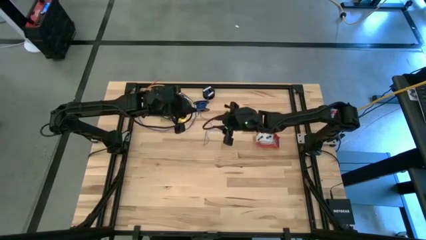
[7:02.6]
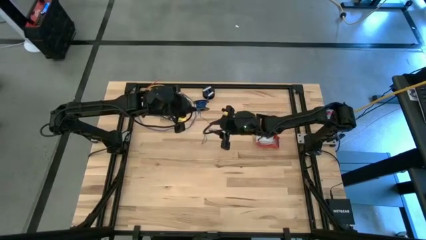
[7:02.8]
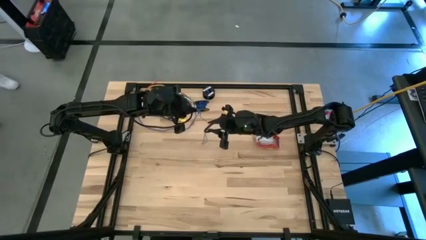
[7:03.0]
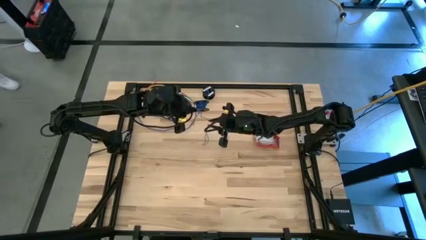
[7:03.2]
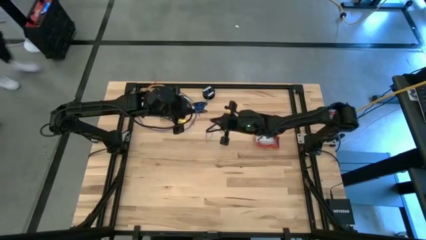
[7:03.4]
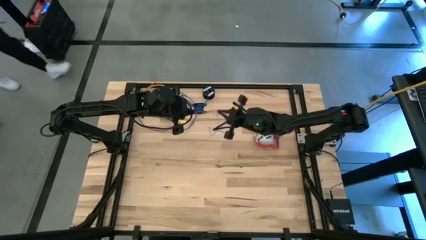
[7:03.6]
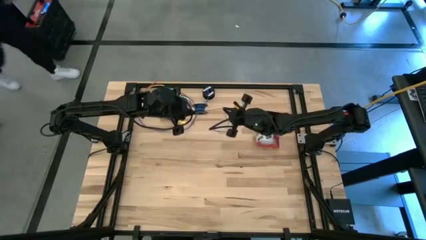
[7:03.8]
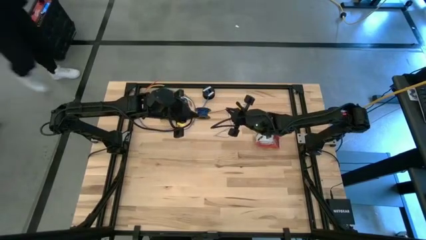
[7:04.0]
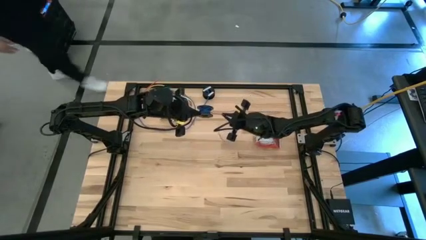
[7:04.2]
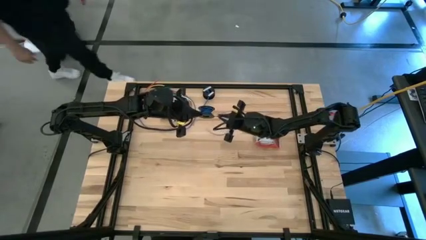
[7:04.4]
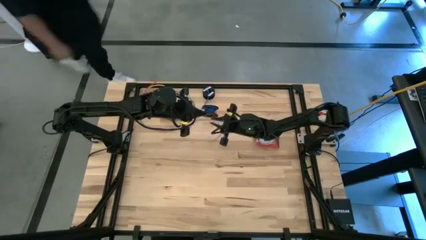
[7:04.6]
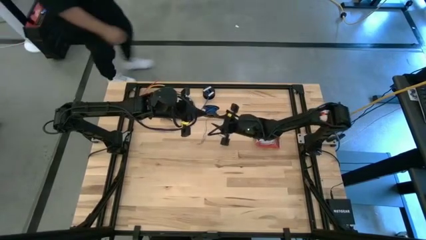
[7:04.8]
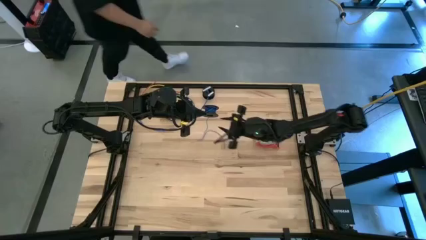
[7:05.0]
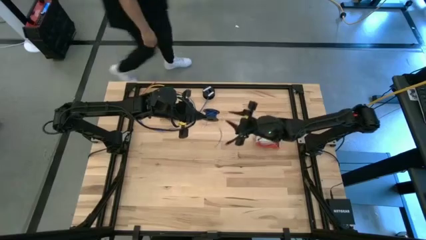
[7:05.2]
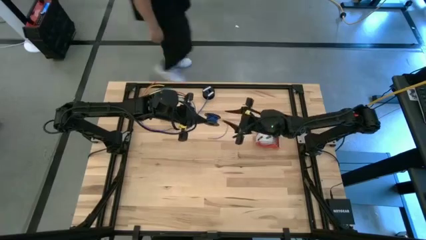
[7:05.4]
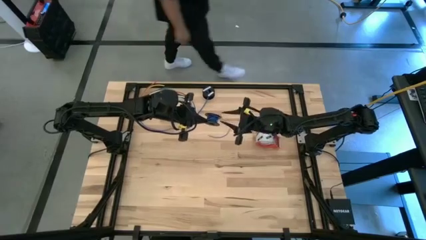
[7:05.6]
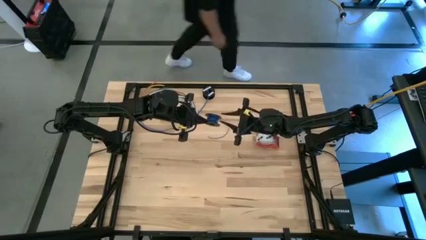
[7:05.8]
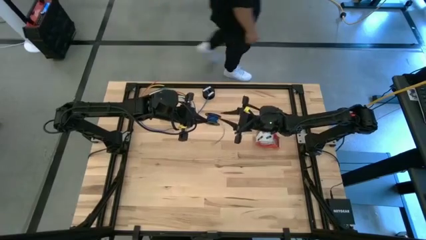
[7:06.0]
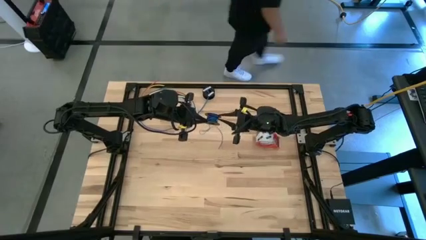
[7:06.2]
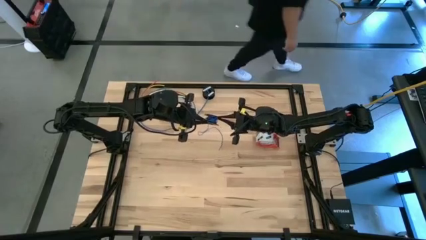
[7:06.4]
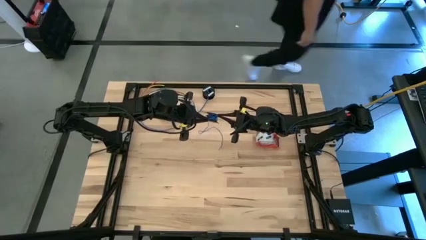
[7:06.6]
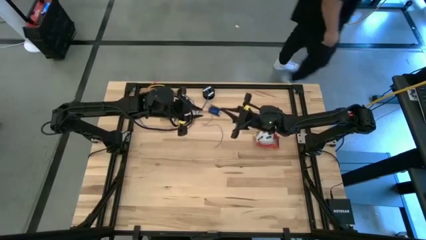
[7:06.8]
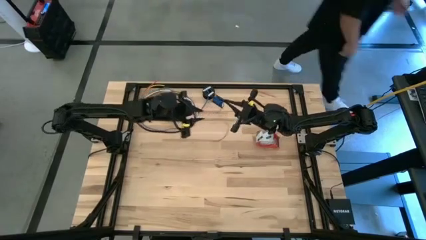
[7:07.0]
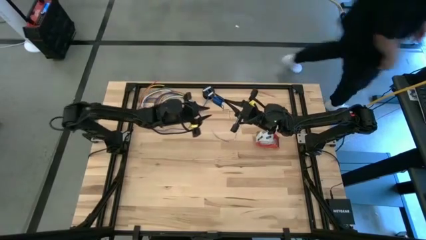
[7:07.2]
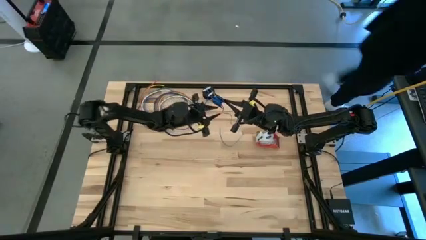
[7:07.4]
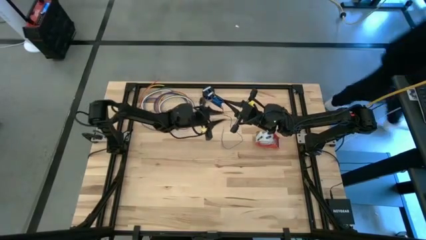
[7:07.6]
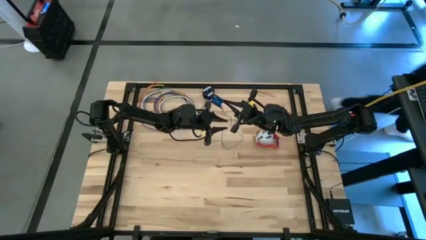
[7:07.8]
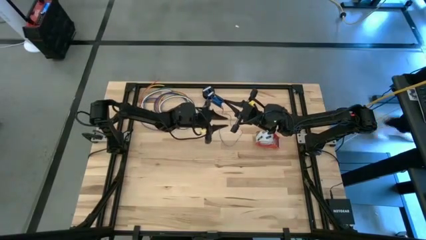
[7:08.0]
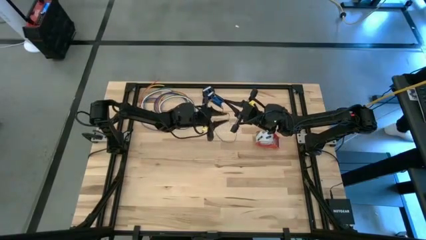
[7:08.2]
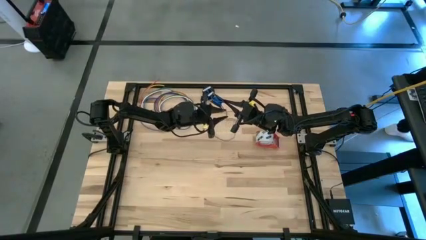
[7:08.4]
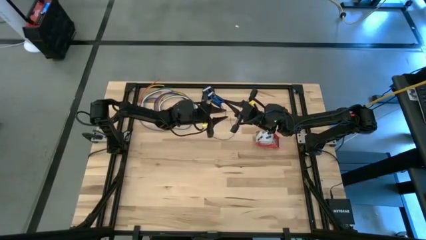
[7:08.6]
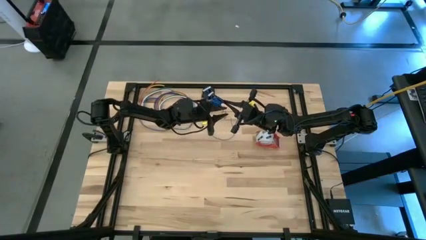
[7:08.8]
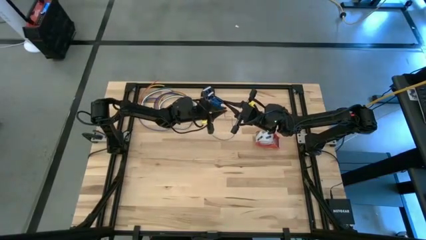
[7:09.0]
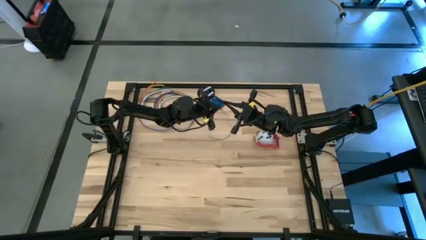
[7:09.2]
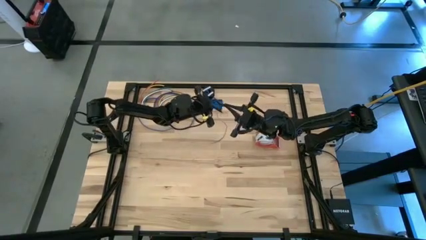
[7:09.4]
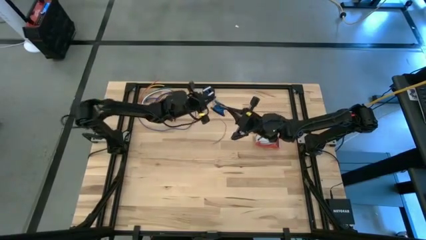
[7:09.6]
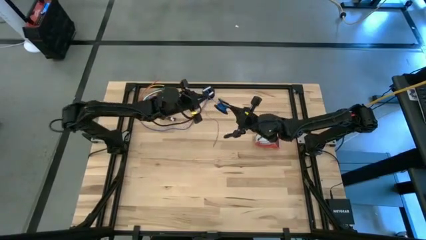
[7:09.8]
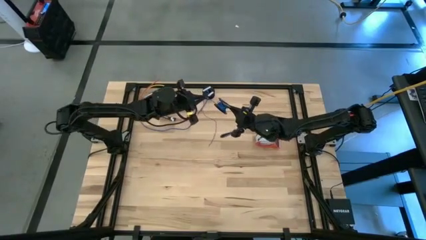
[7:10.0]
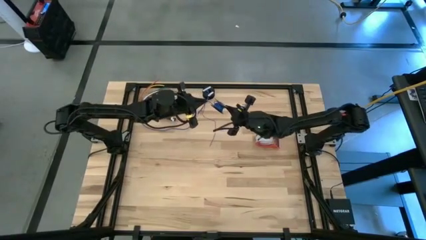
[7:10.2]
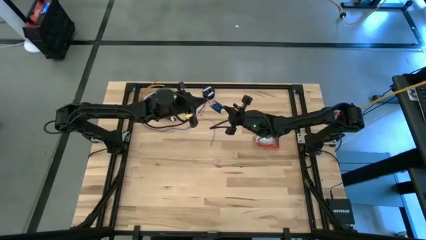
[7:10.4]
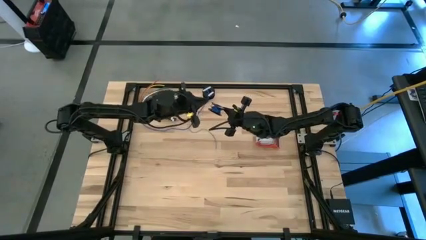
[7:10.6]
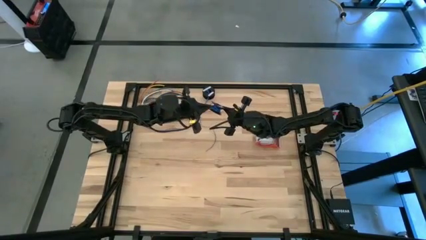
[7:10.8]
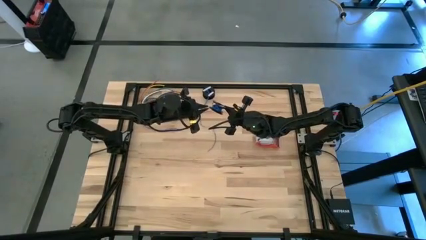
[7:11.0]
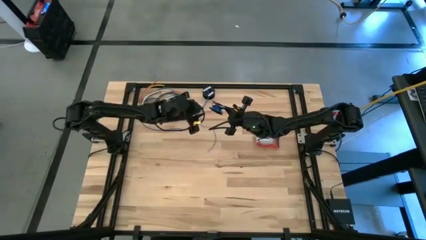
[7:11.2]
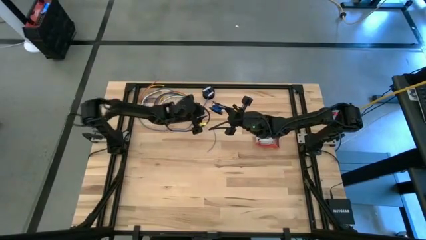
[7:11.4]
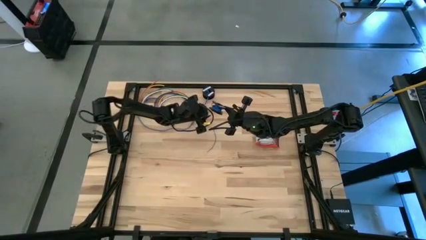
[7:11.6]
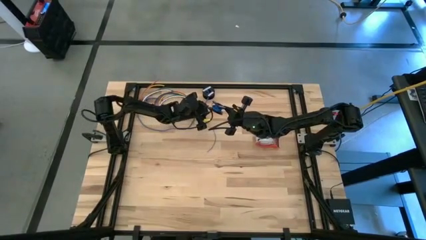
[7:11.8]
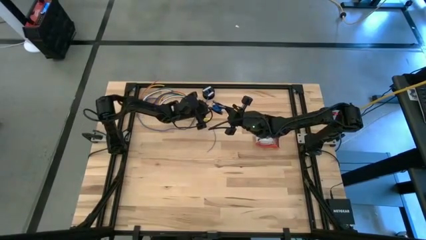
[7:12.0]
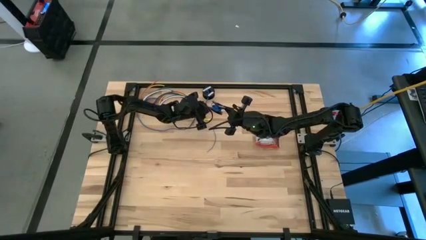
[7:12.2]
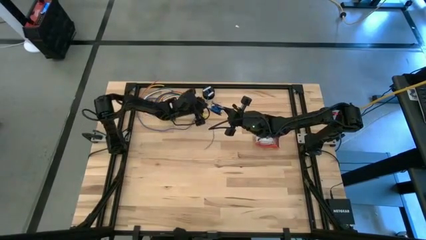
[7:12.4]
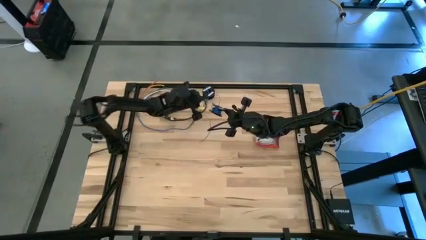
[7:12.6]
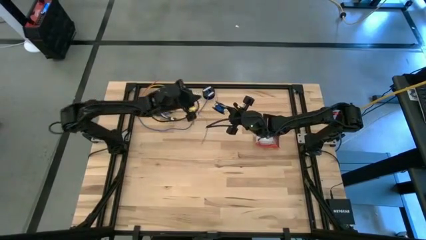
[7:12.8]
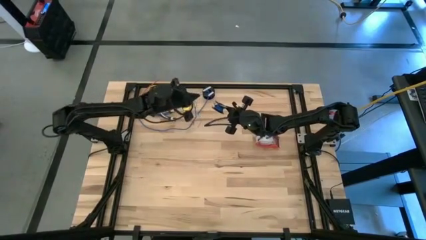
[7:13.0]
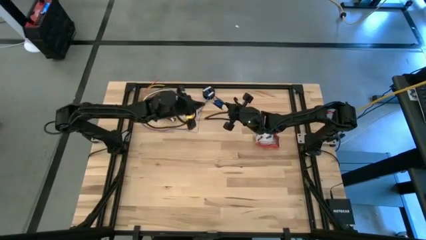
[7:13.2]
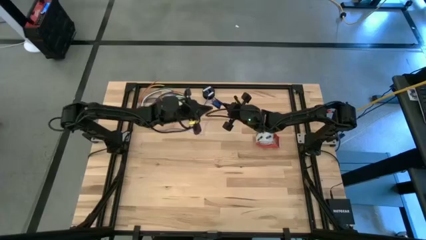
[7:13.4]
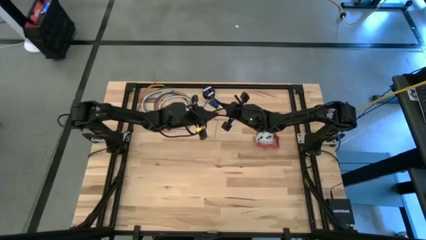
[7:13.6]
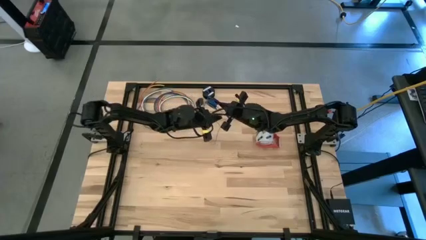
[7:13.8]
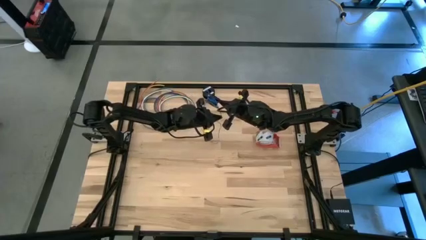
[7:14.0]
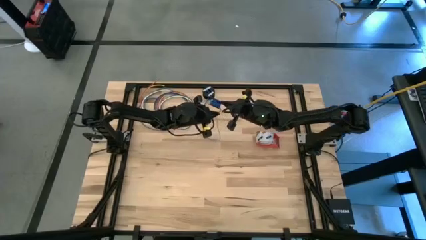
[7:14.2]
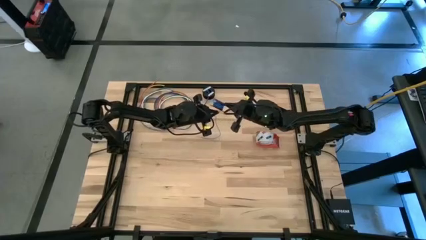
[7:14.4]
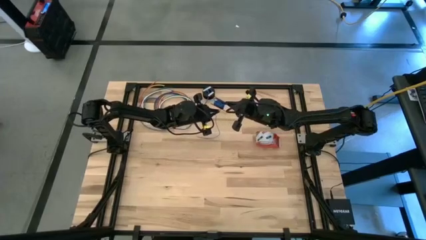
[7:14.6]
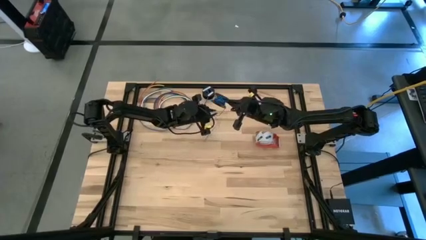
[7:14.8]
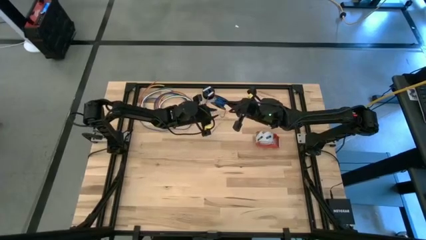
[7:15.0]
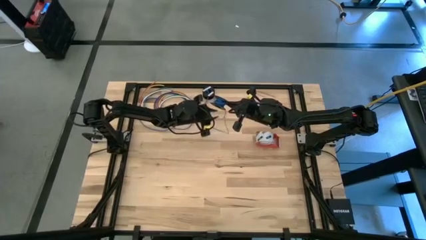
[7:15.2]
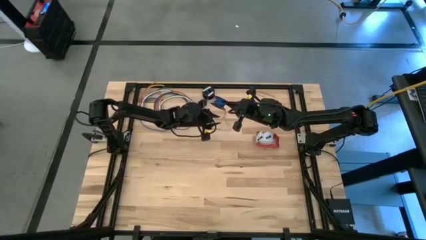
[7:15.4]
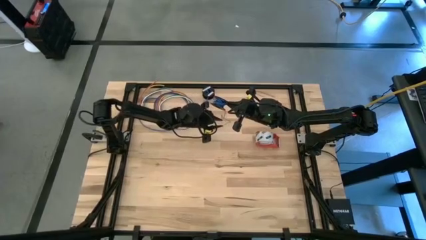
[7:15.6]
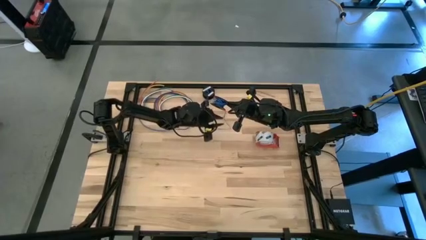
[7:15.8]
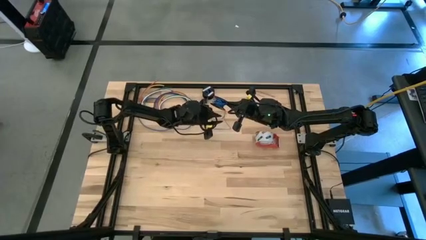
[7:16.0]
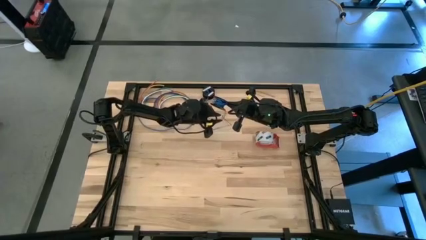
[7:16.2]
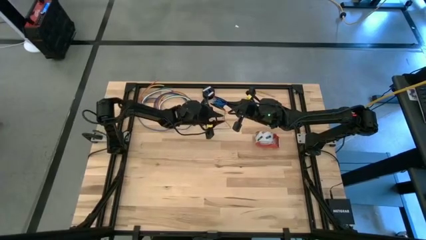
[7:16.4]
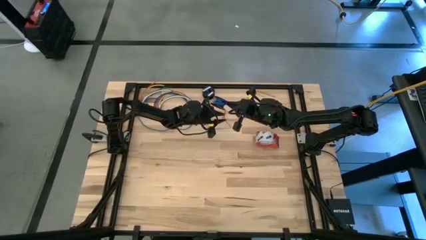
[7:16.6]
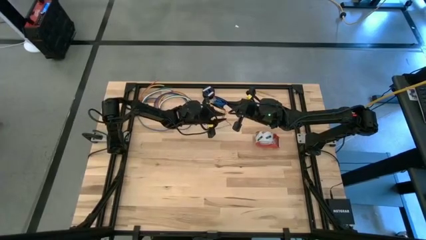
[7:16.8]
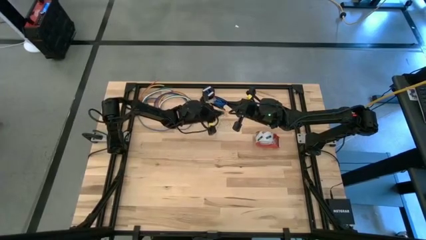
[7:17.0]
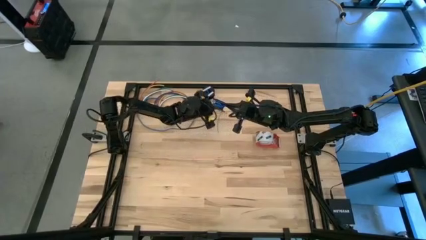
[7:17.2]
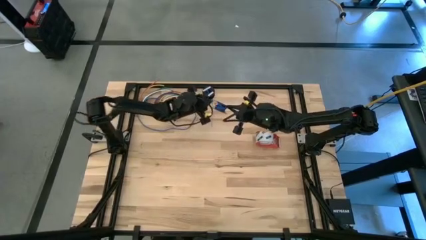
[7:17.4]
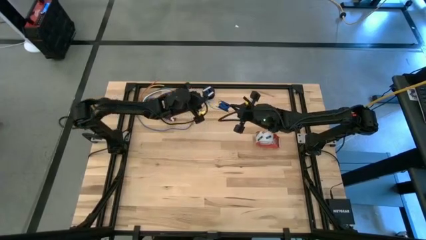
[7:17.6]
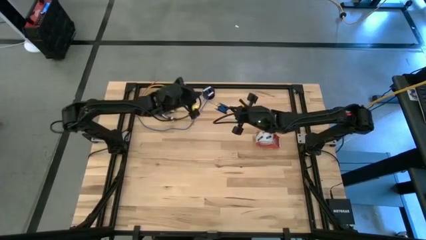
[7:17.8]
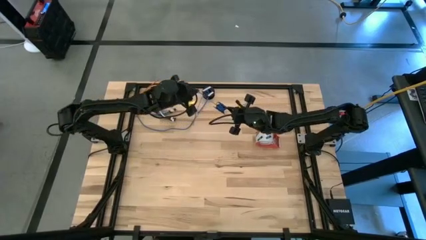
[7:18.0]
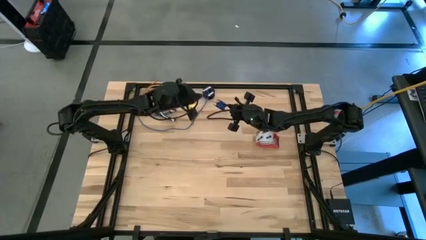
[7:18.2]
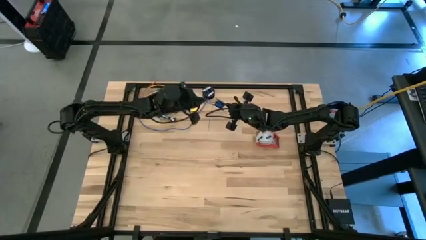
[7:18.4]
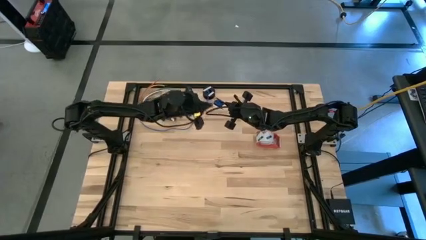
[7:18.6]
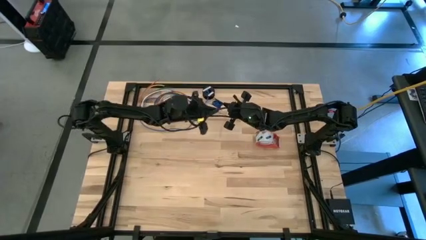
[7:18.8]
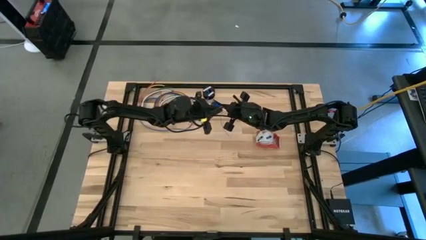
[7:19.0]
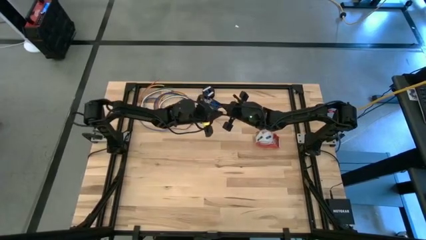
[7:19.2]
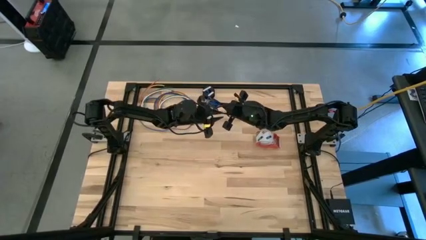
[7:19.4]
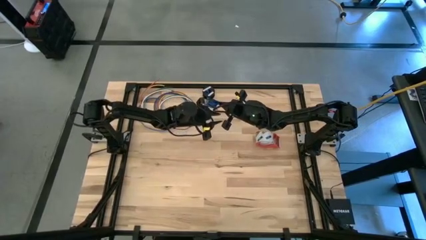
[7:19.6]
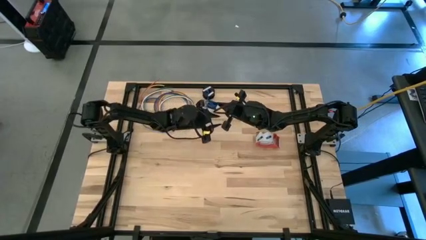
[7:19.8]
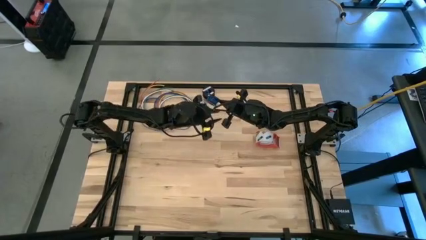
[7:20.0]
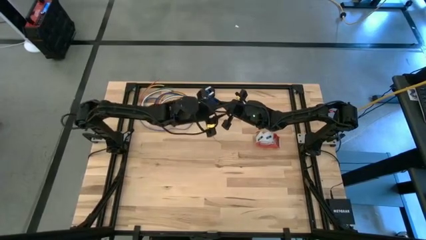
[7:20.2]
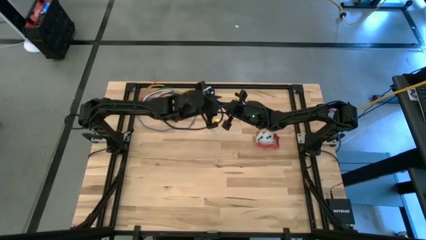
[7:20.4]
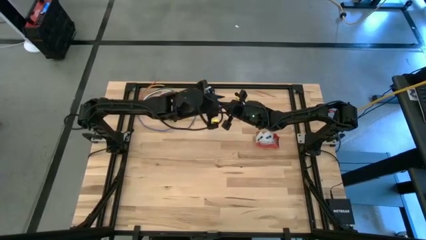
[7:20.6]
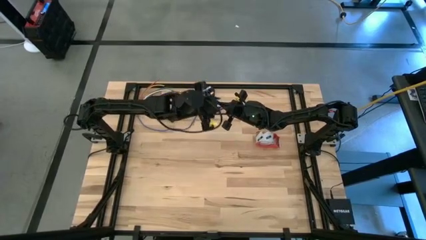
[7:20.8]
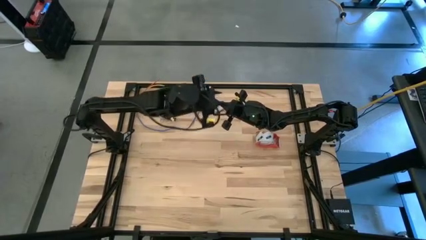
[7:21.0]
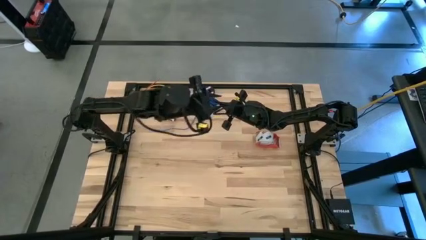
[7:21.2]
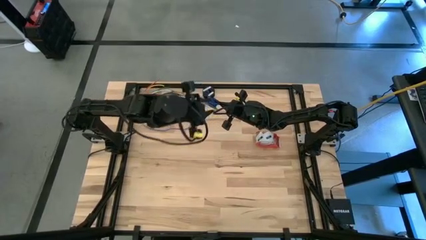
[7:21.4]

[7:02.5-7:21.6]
Task: Coil cords
Coil the blue wire onto the spool
